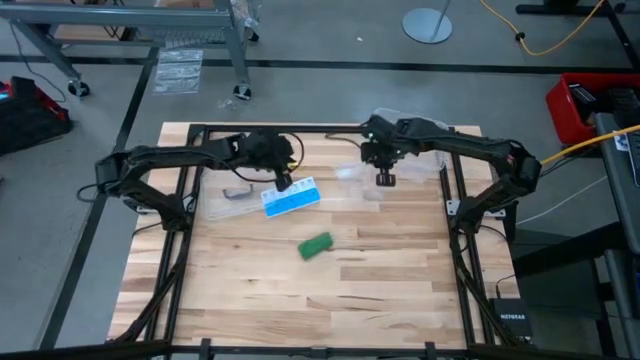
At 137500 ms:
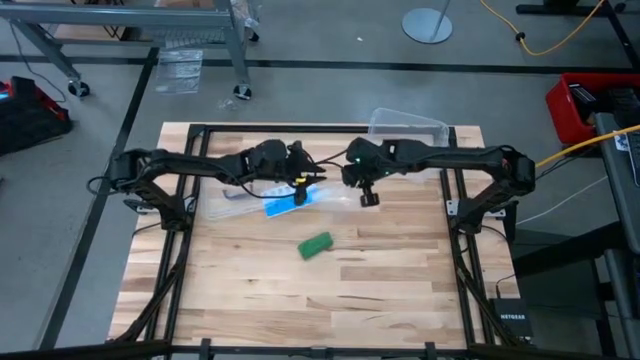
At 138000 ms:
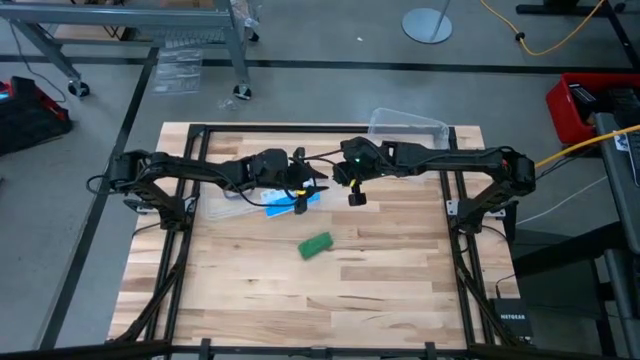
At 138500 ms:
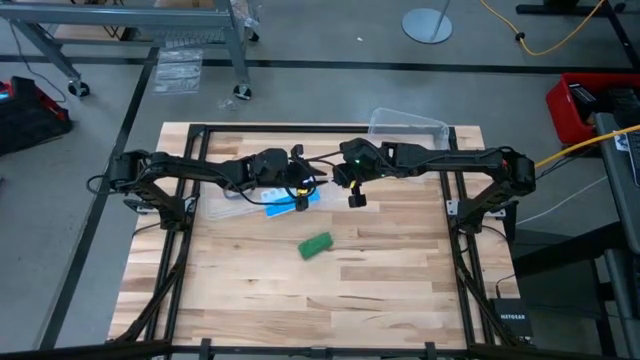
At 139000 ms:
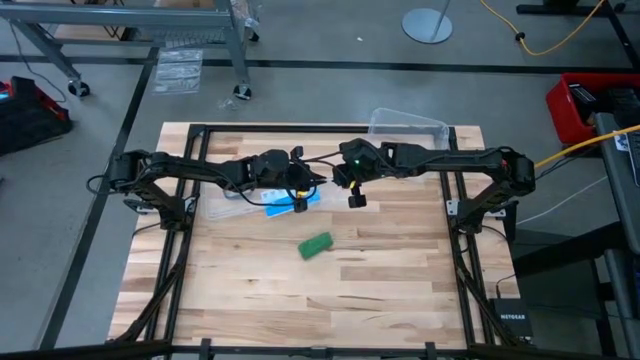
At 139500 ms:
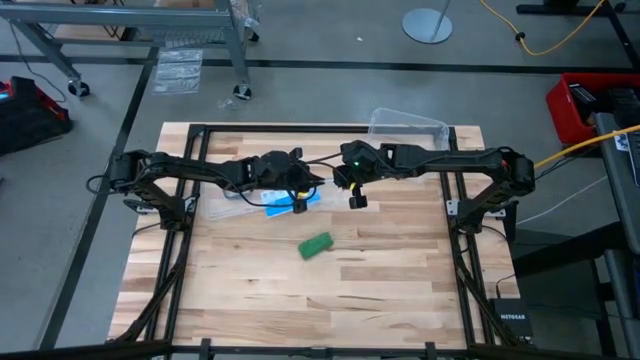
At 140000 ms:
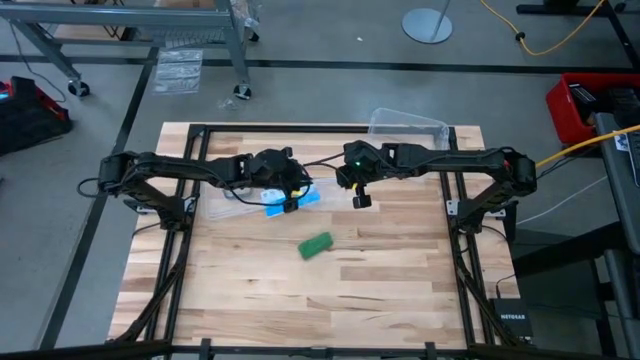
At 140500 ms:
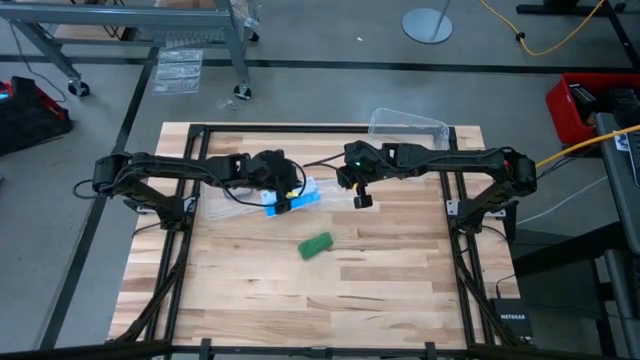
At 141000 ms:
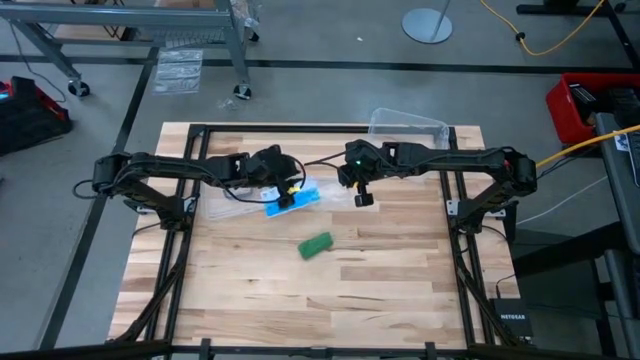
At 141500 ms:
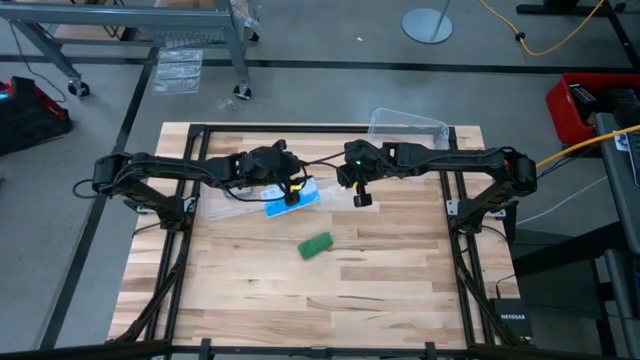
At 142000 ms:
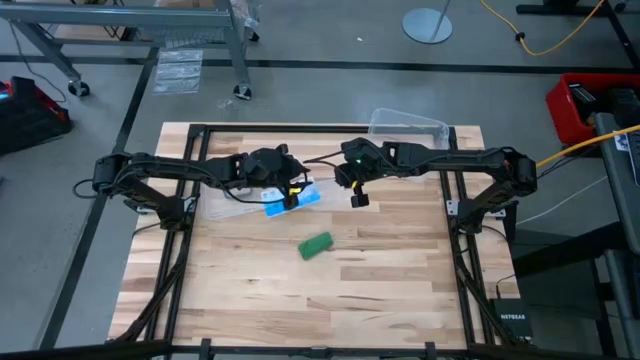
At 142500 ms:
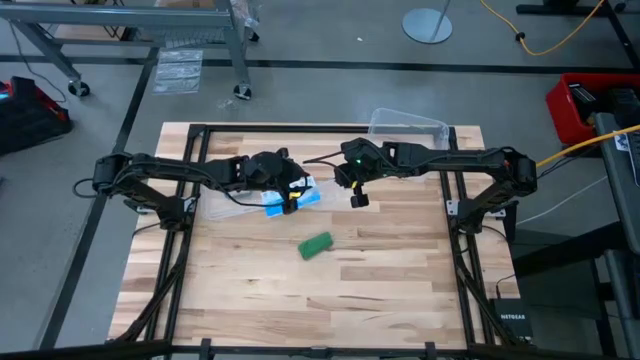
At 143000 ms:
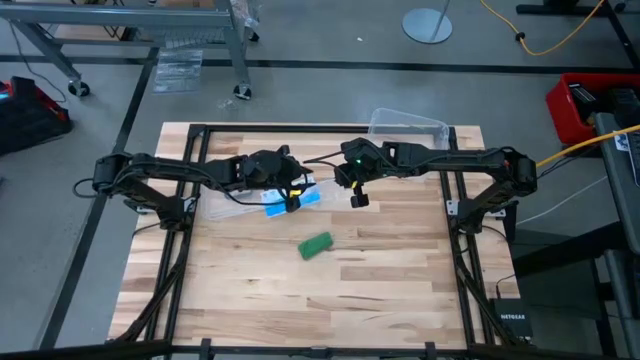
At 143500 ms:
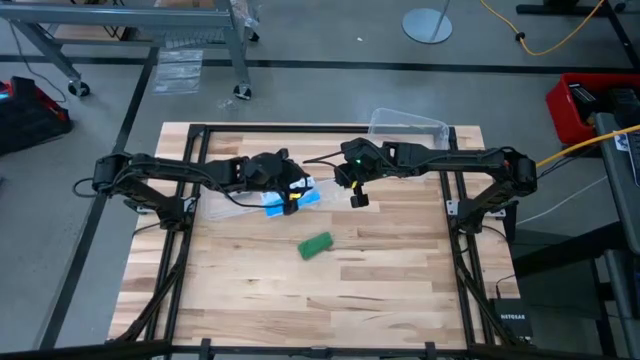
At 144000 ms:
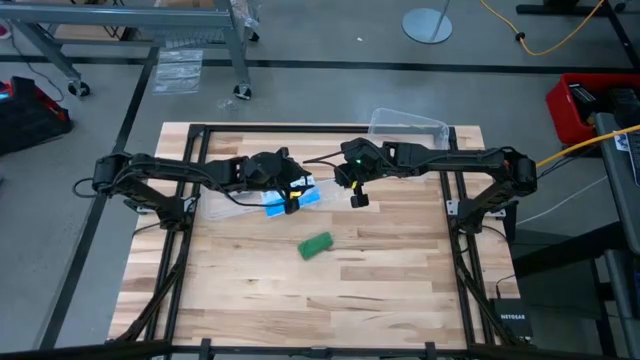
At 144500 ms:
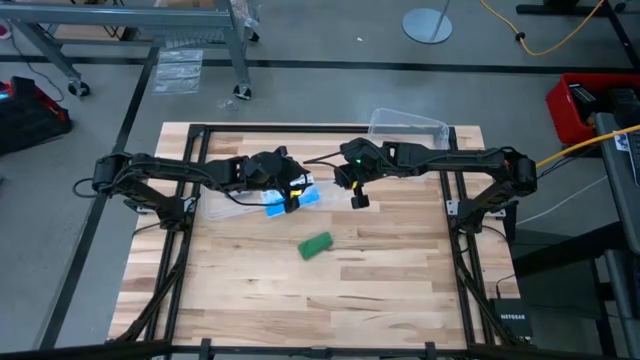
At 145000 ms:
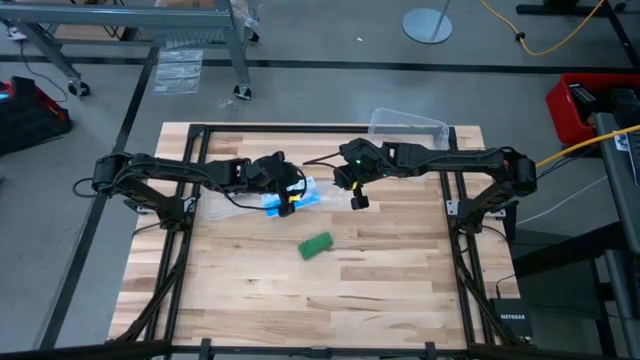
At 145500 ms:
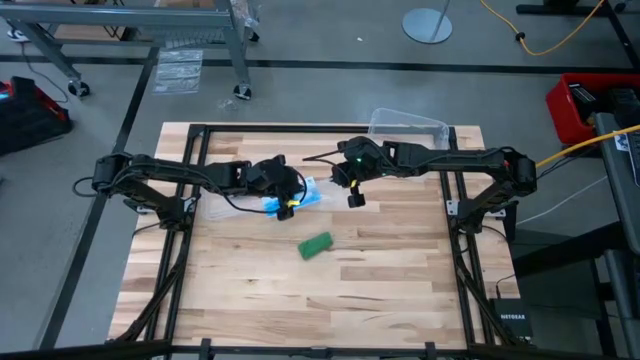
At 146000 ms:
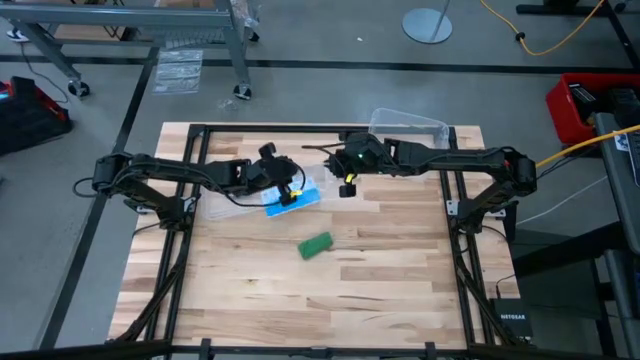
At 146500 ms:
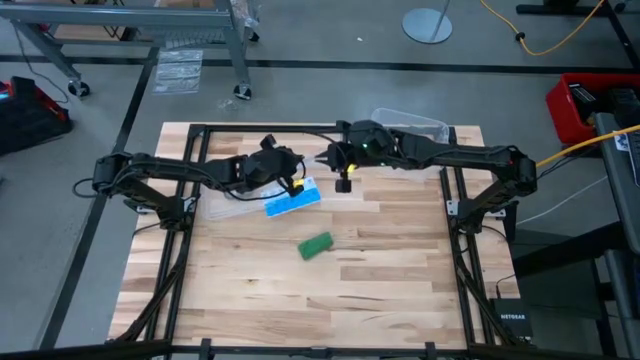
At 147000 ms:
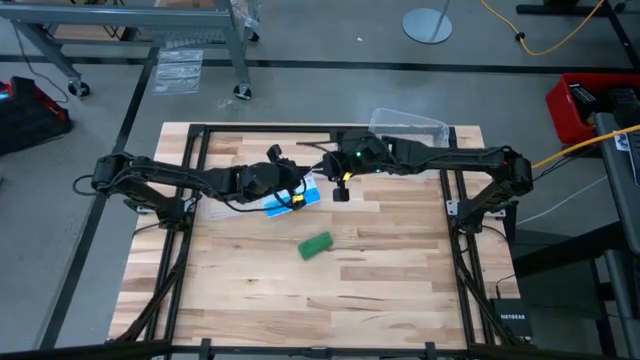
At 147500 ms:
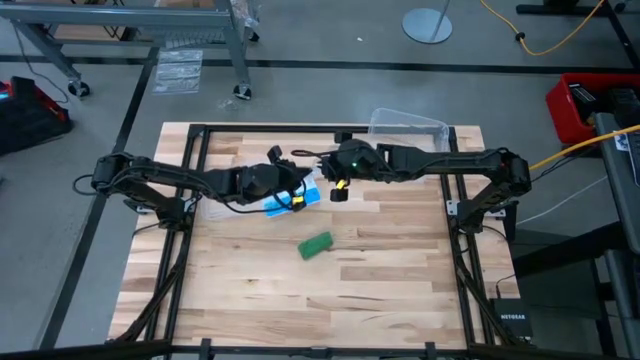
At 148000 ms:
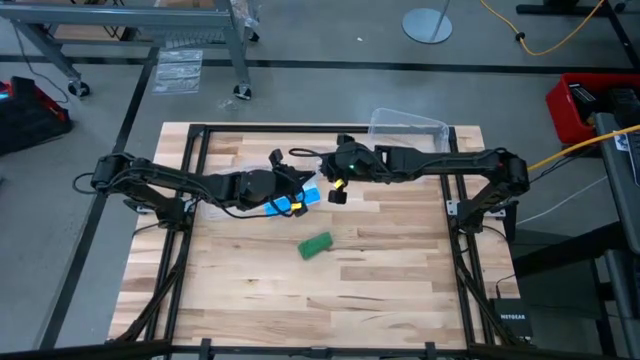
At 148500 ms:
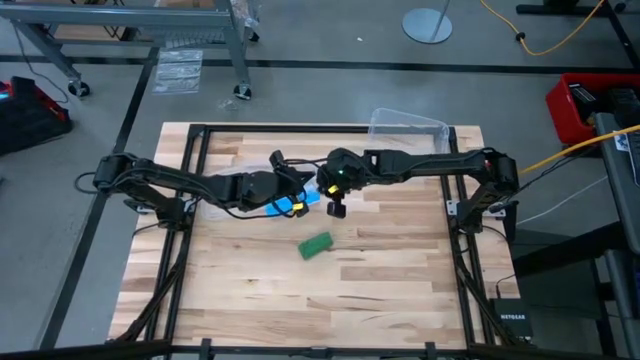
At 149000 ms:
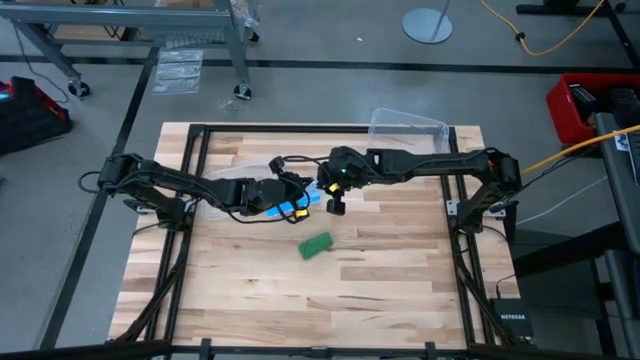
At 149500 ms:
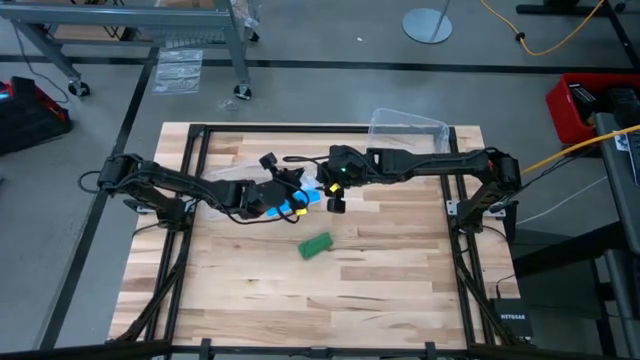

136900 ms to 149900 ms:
Task: Roll bandage
Open the transparent zip bag

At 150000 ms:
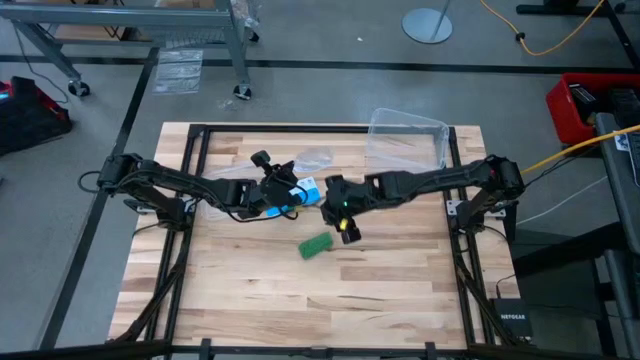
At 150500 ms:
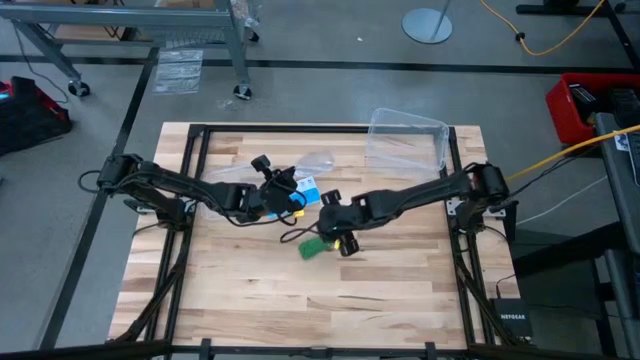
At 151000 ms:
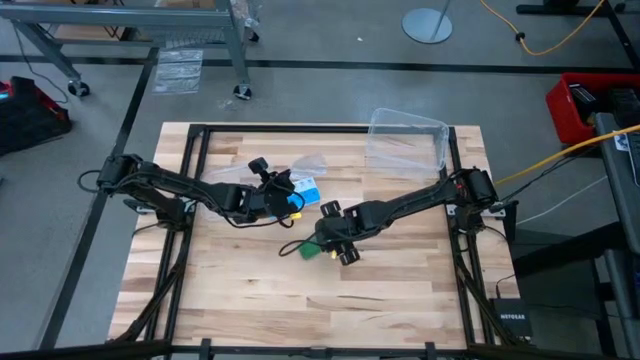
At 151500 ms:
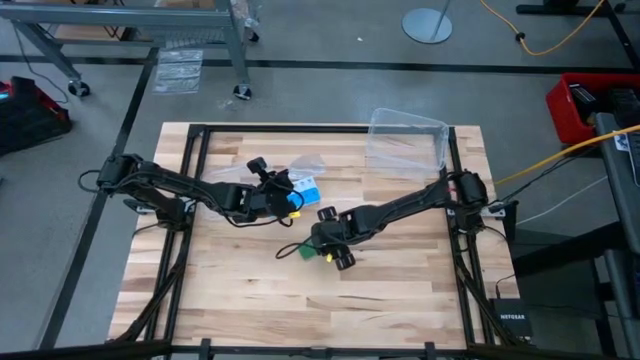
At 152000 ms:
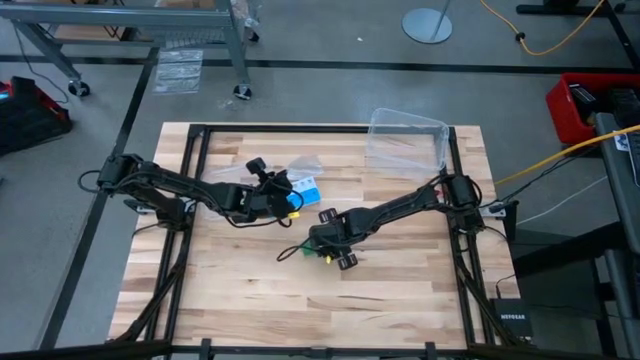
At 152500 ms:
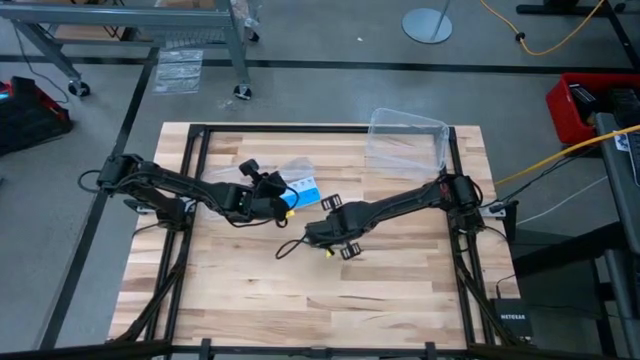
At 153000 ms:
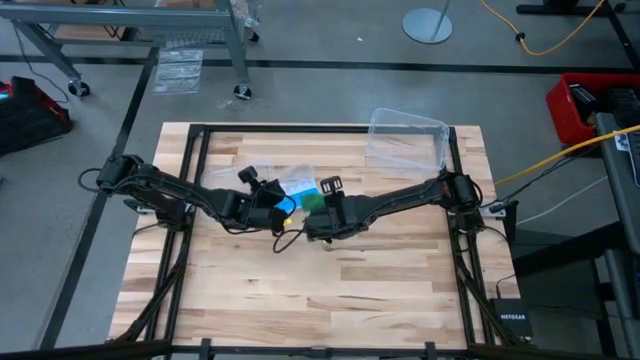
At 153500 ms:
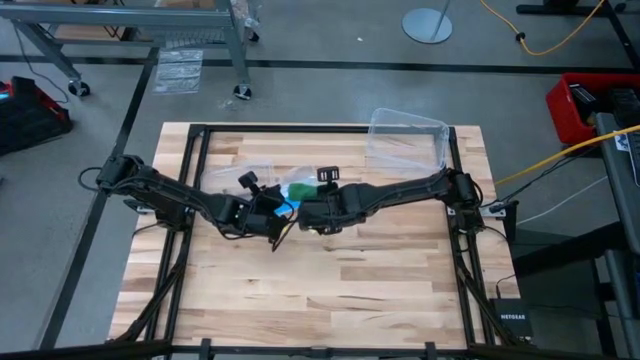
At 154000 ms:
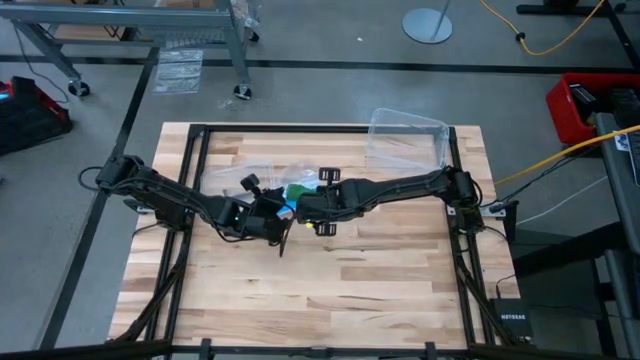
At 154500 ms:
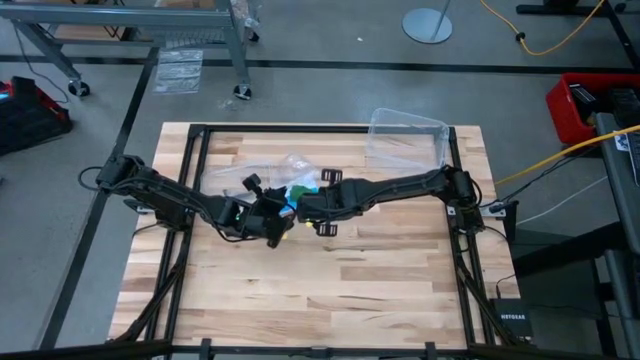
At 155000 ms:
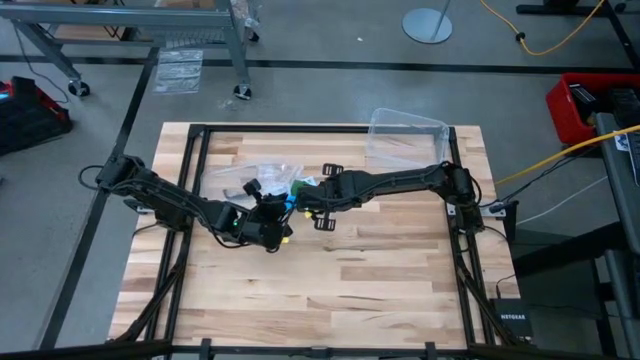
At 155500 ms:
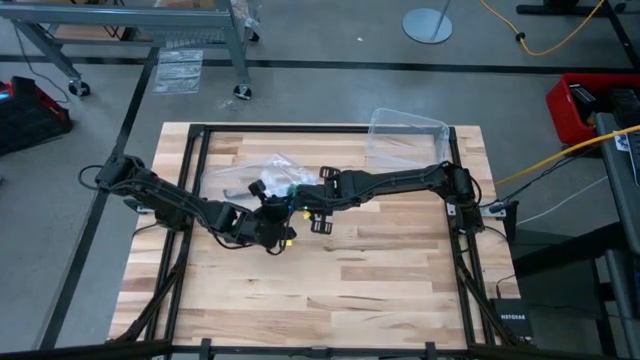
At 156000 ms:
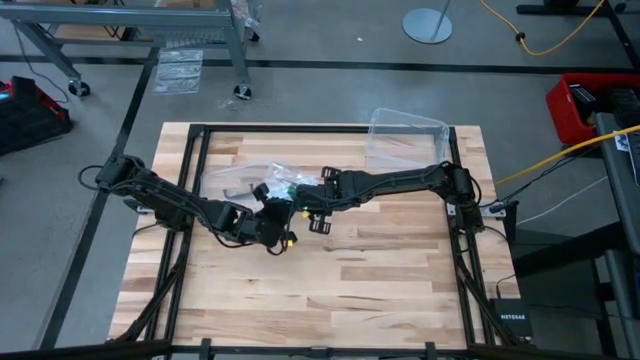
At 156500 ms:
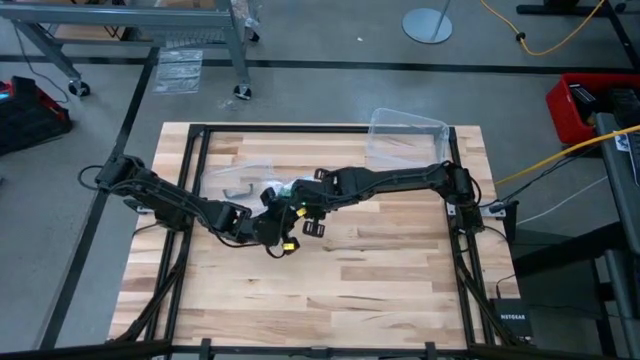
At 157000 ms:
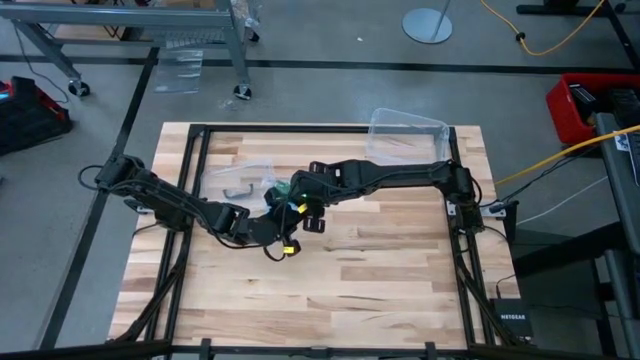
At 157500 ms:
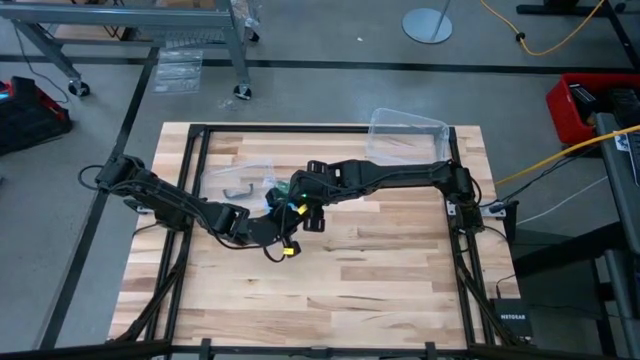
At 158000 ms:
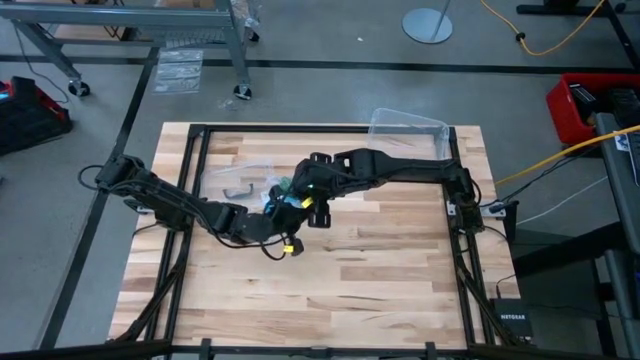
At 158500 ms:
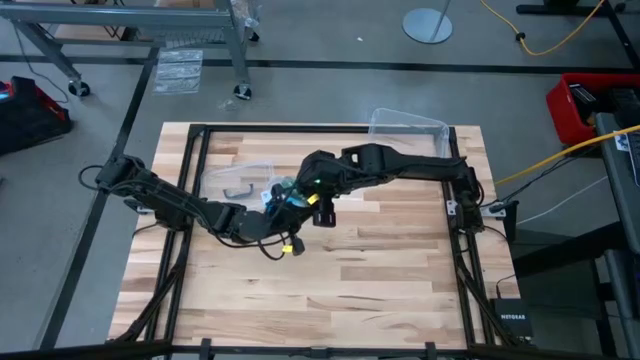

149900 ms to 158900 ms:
Put the rolled green bandage into the transparent zip bag

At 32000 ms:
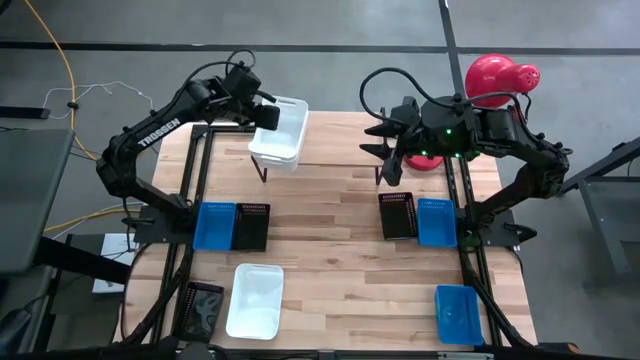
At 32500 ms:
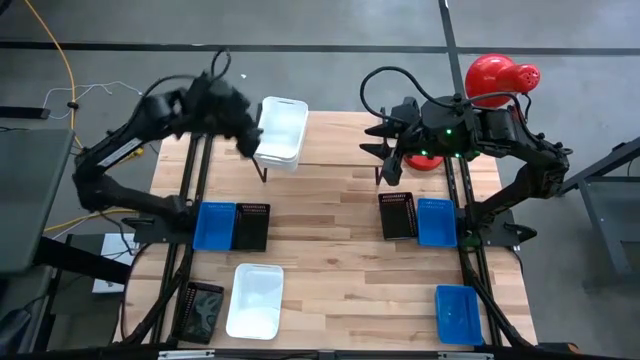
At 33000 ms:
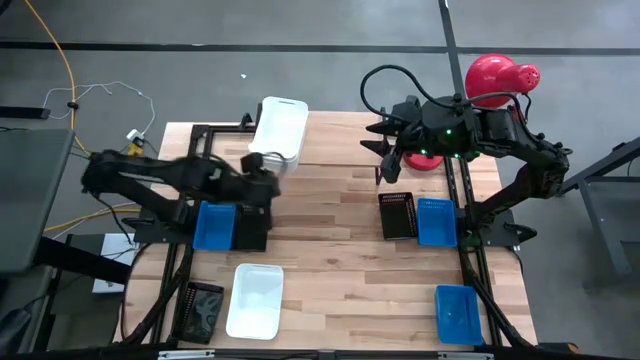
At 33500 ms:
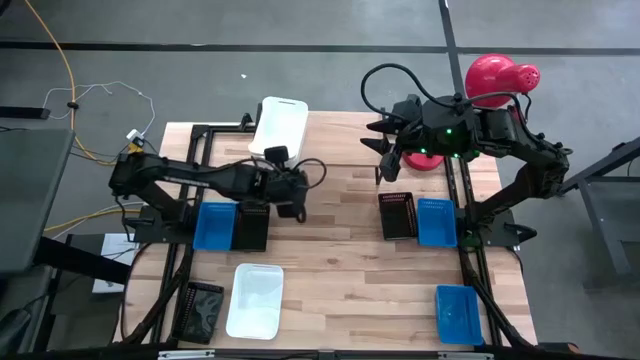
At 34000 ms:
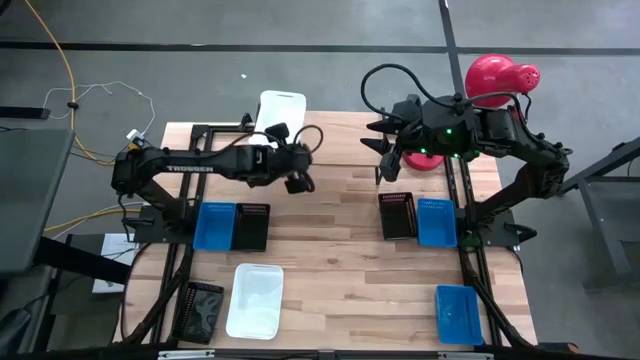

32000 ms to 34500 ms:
Task: Stack baskets on shelf by color
Adjust the bottom white bin on the shelf
